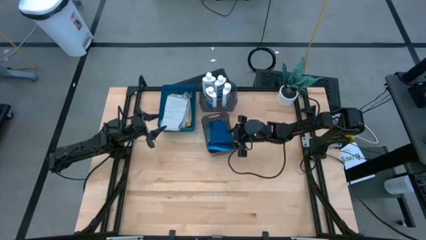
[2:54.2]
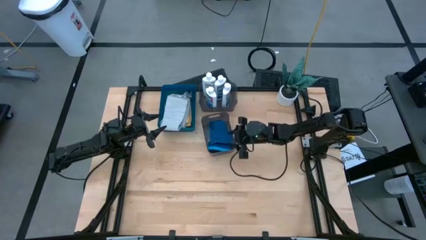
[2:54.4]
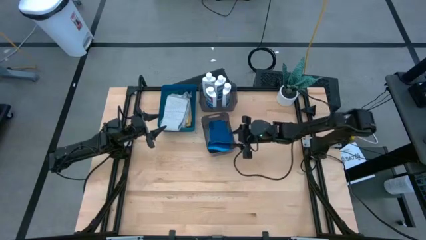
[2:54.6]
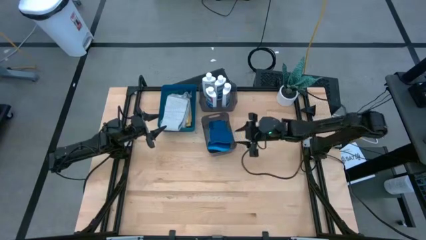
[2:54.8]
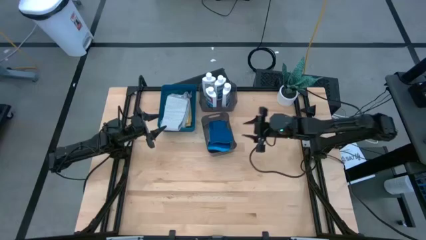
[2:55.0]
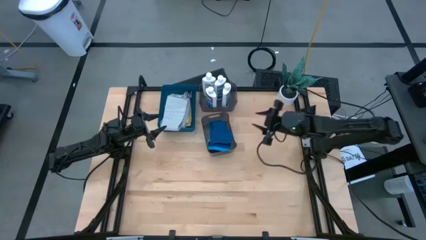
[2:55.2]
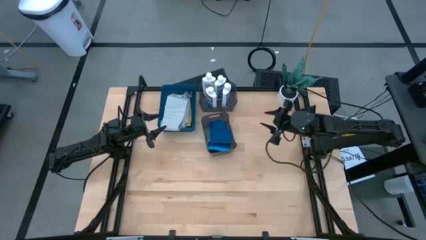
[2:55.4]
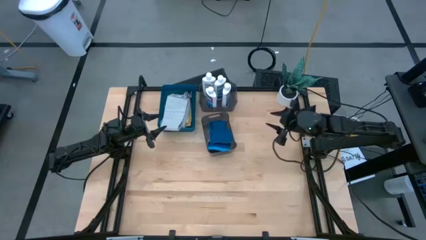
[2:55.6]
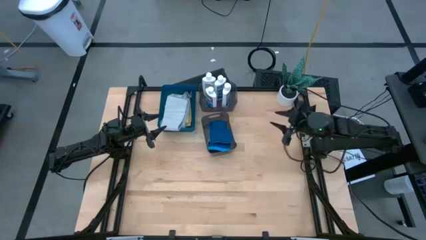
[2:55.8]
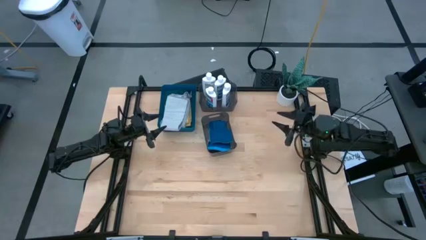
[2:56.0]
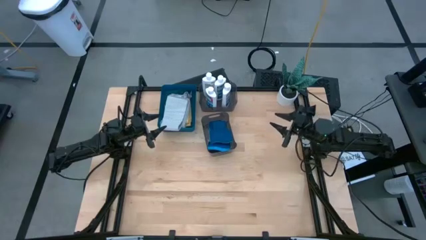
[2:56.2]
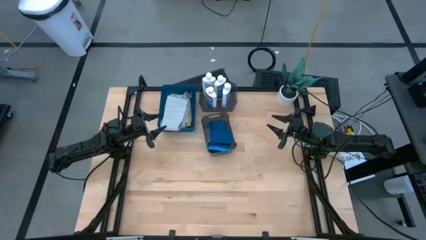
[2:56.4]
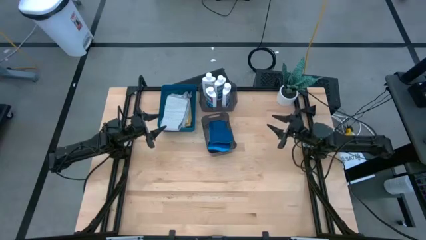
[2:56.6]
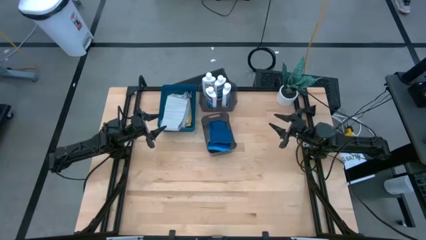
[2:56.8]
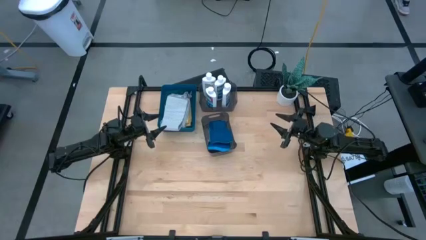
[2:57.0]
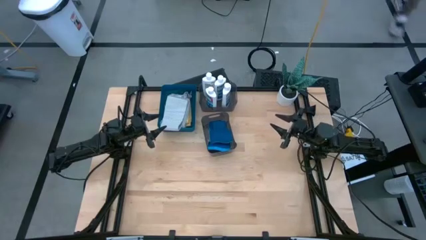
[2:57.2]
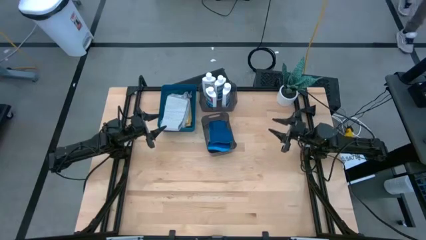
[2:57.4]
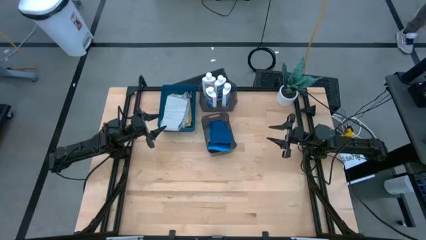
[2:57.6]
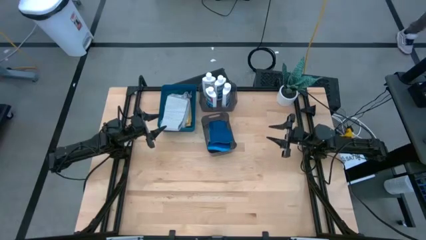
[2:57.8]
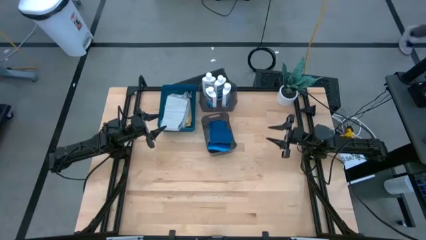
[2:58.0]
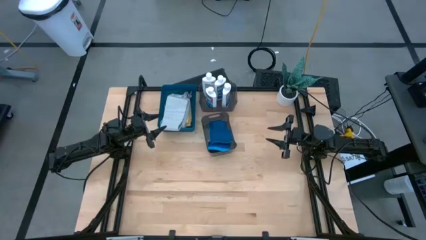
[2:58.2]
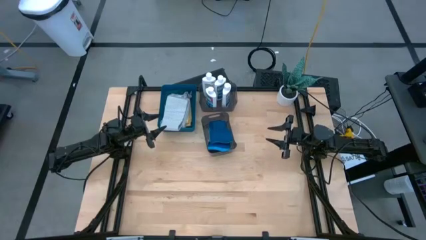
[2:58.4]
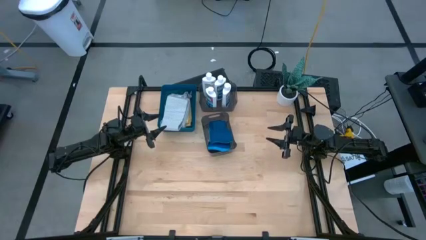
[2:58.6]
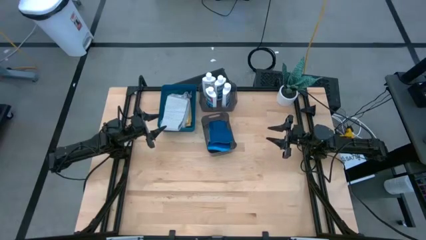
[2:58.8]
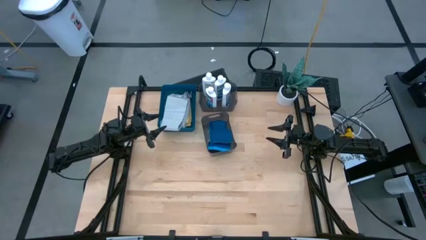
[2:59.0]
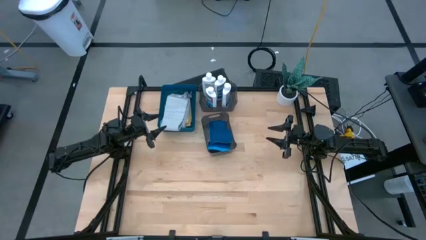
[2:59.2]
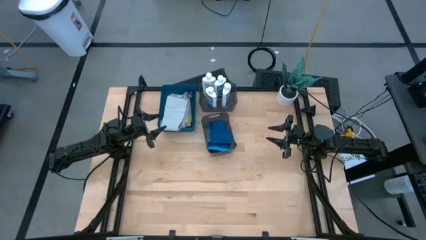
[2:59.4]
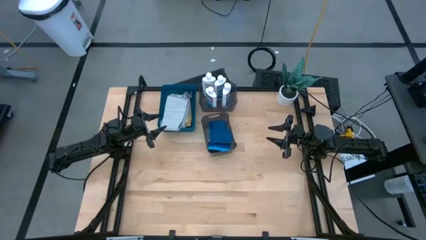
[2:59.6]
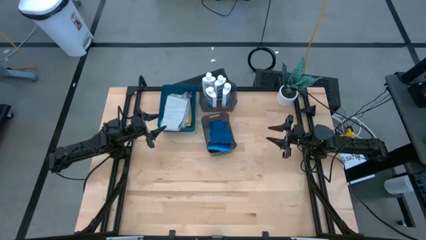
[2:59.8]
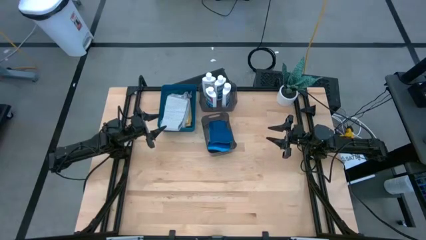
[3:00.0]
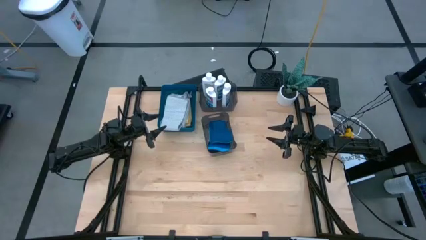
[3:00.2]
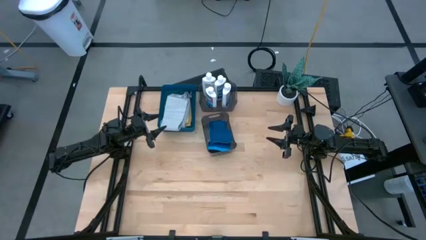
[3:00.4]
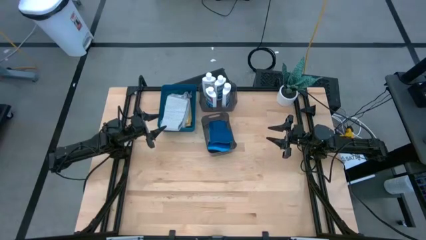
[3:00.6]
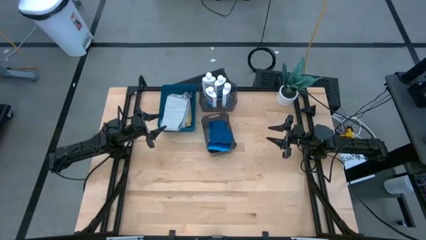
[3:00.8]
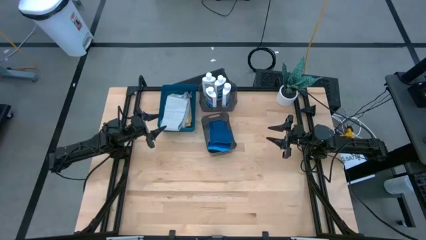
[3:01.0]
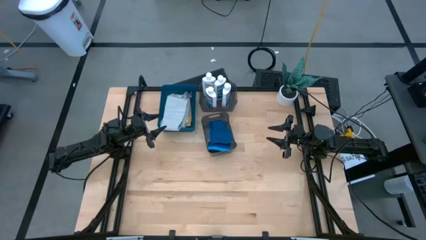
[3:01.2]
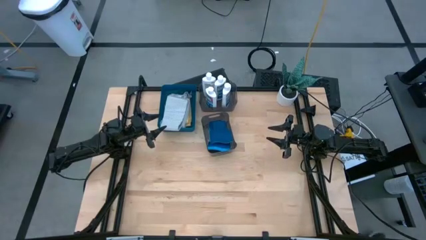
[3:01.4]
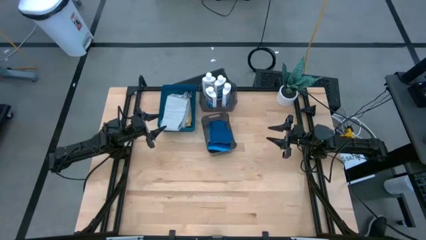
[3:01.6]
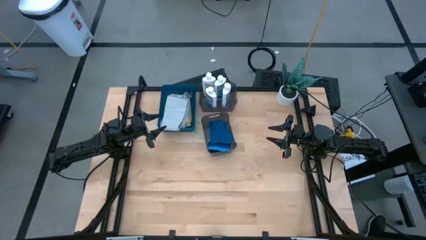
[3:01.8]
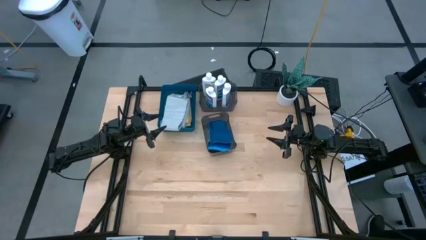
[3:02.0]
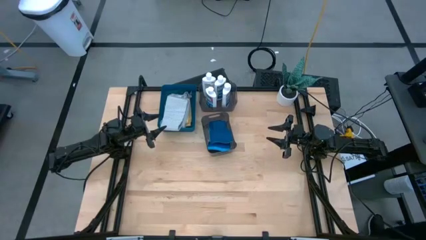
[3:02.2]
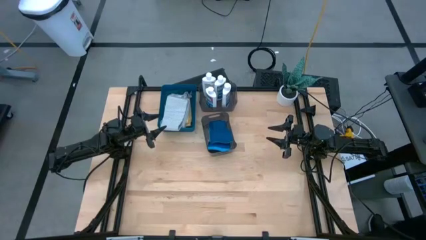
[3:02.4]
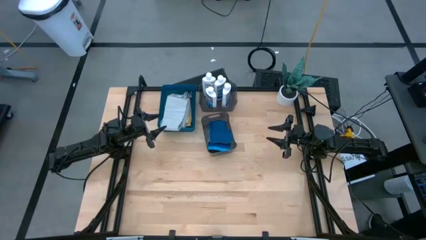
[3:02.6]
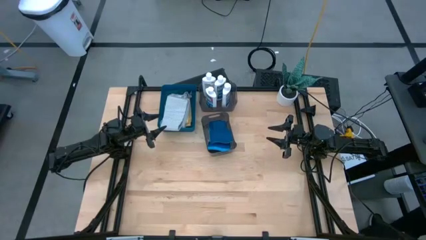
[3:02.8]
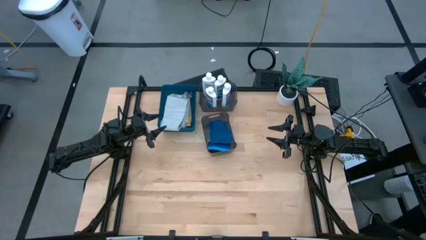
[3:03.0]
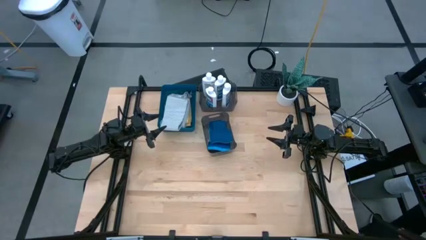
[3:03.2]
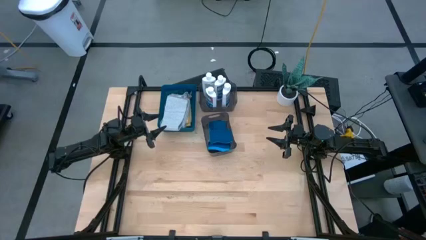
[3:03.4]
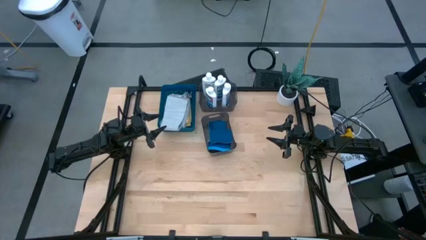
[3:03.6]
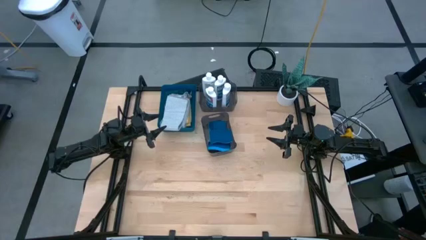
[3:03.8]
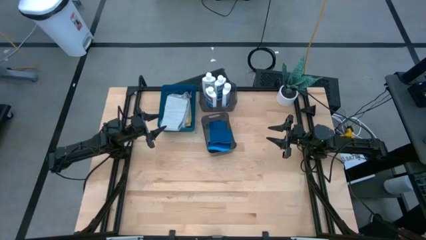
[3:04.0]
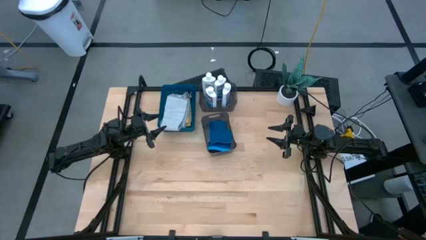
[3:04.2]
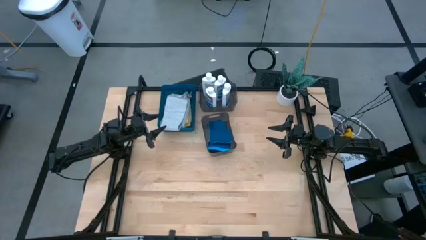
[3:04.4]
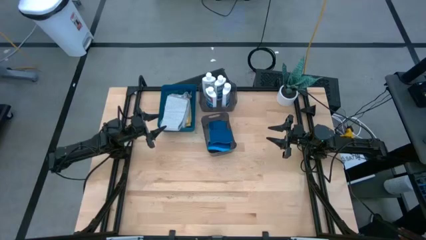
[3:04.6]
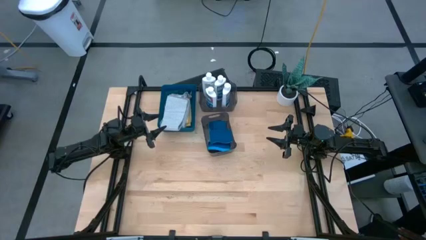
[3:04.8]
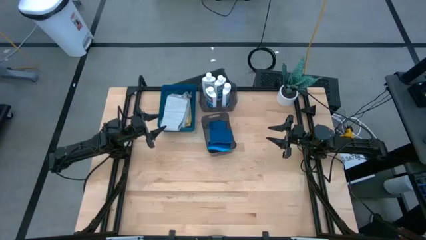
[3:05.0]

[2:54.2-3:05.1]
Task: Pick & Place Kitchen Items
Return to Home Position

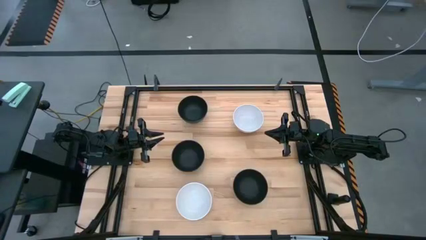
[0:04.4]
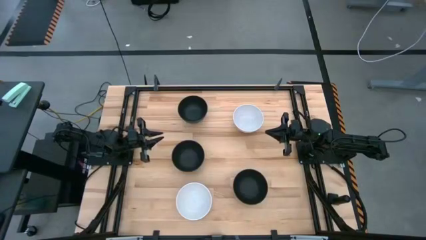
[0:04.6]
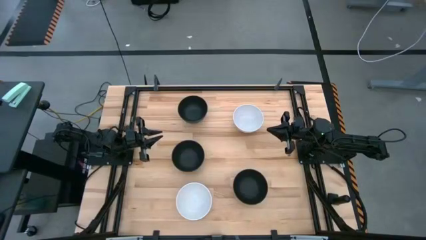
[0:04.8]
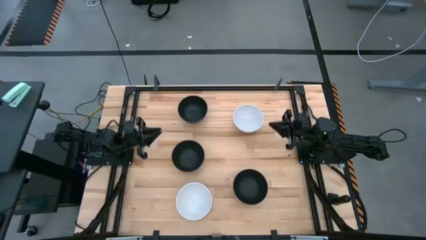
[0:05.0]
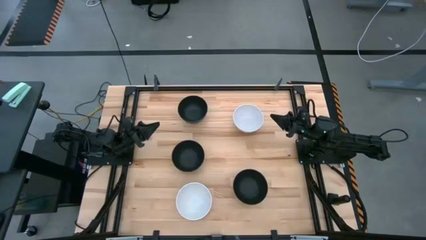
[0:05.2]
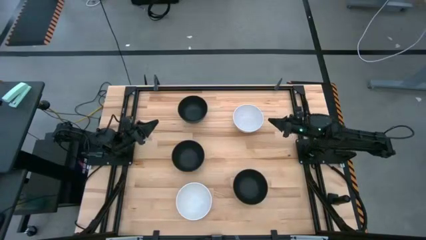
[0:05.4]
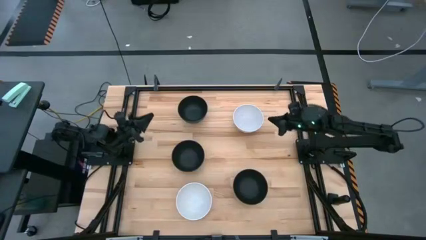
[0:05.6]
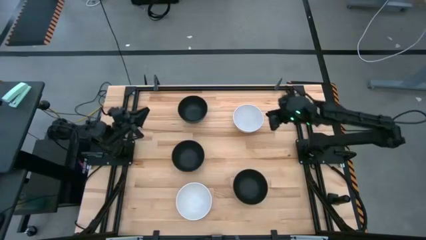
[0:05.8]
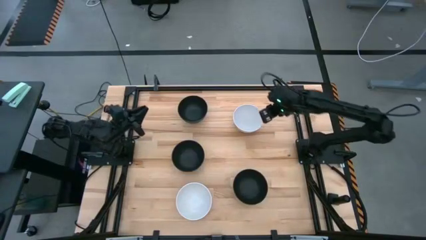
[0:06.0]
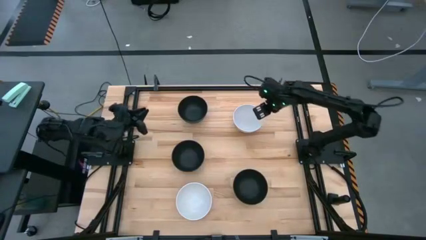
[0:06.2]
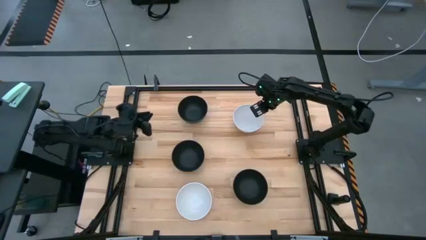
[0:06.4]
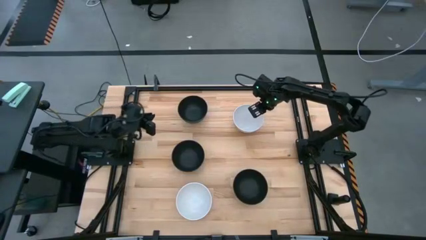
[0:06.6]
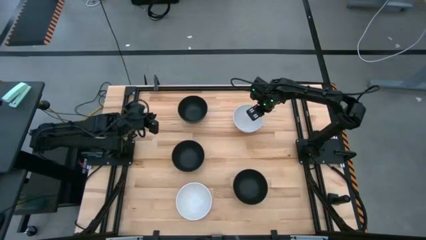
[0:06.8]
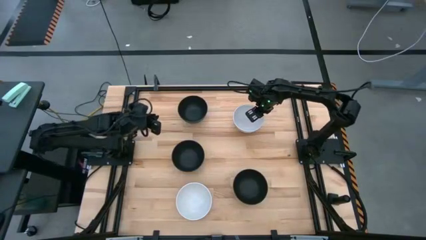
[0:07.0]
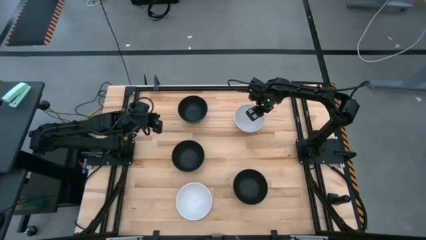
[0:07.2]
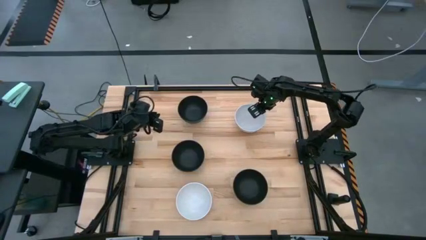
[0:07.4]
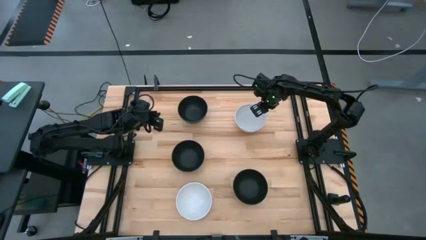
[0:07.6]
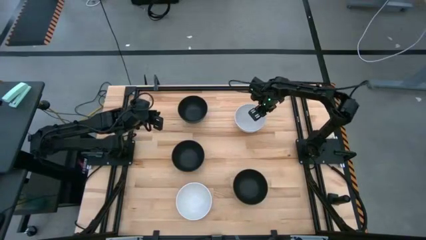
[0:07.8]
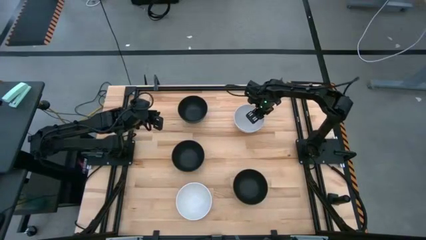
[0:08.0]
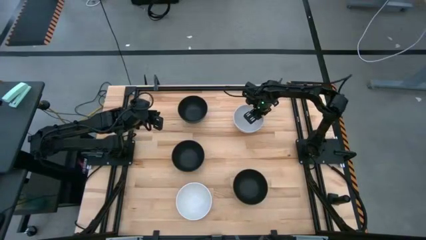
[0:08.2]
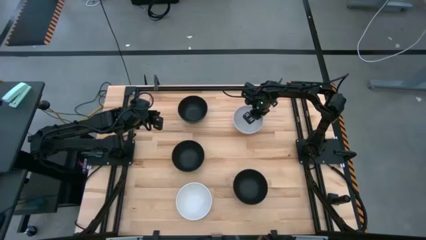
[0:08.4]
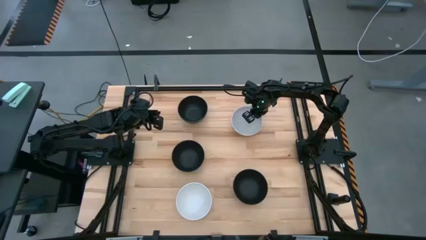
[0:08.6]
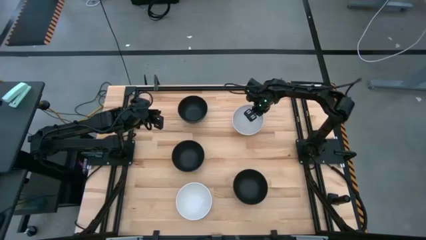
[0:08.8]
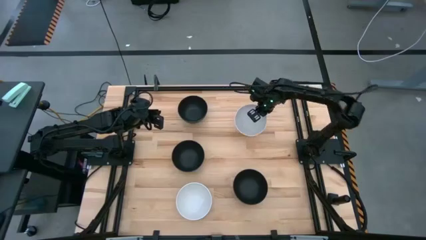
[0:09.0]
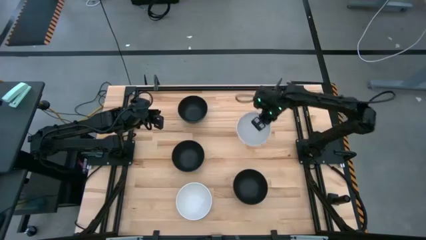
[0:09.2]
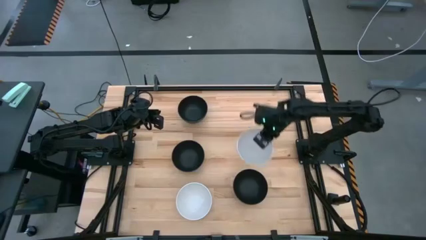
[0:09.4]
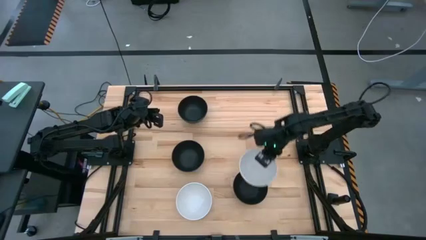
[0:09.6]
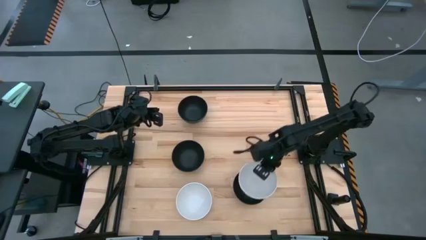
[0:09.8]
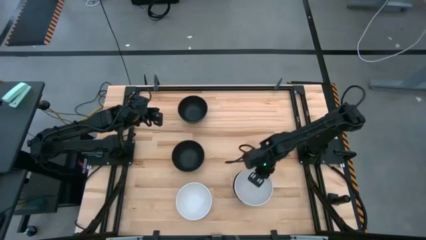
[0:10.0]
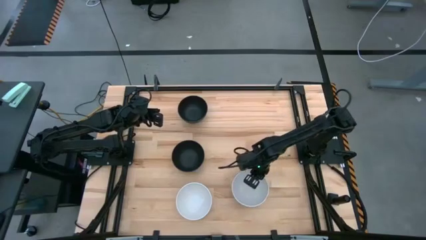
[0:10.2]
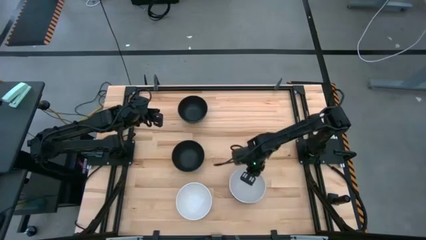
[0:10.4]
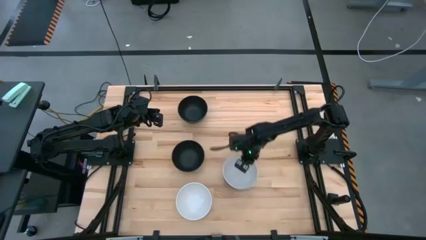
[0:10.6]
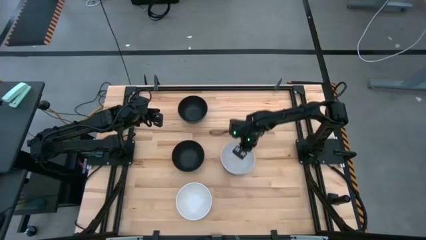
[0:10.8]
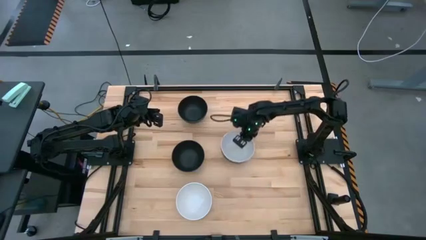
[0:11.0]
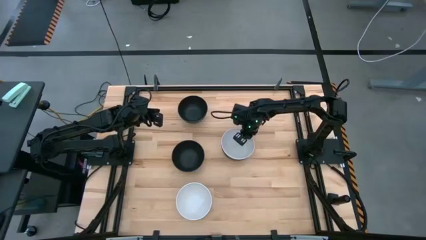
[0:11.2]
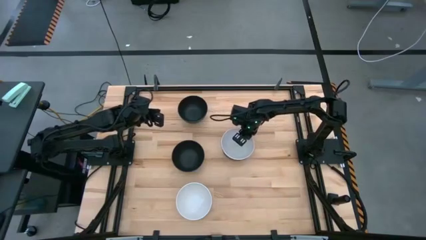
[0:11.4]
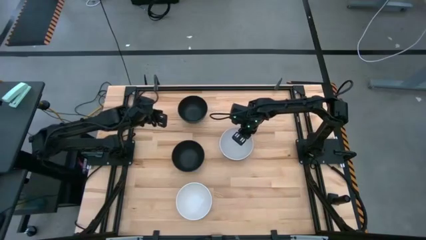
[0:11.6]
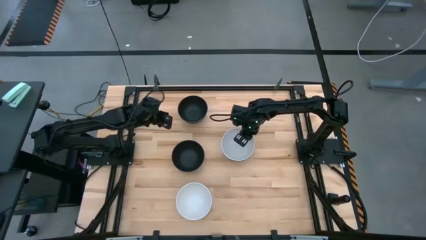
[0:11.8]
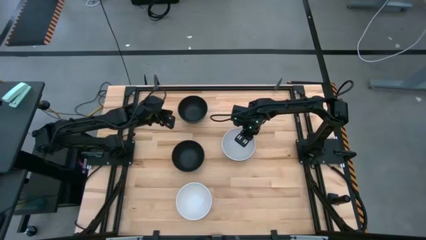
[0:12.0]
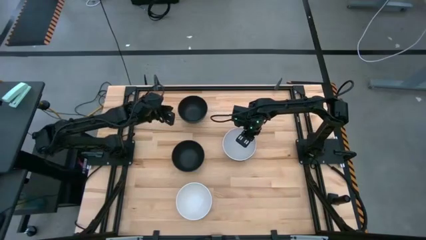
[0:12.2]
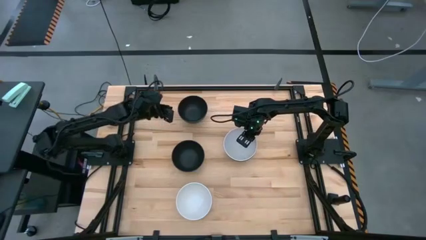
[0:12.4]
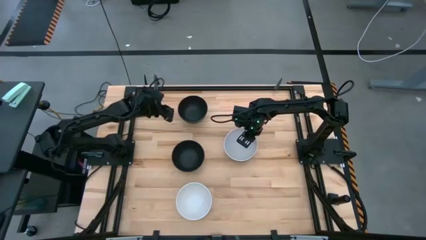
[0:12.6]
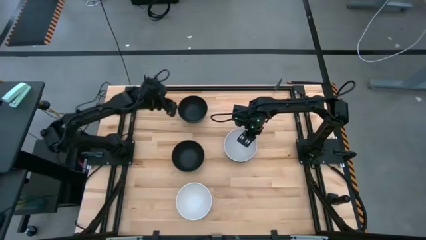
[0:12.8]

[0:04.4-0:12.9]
Task: Nest bowls inside each other
Stack the top white bowl on top of the bottom black bowl
